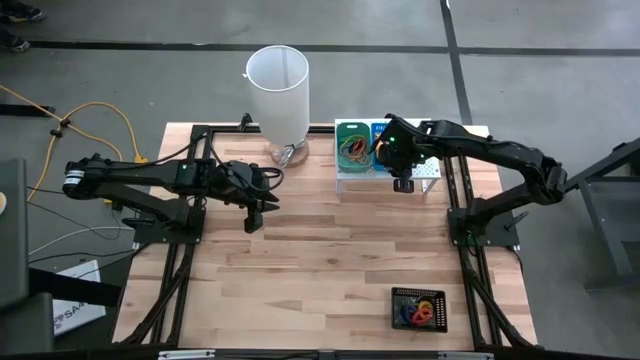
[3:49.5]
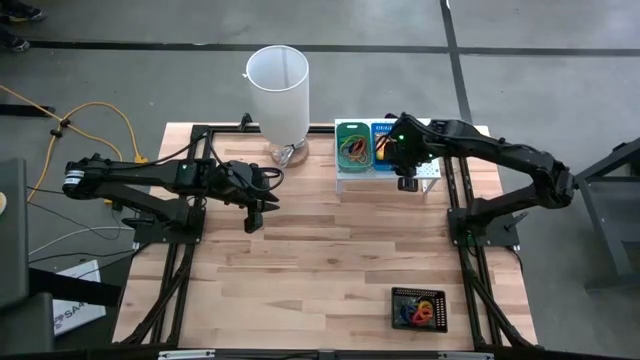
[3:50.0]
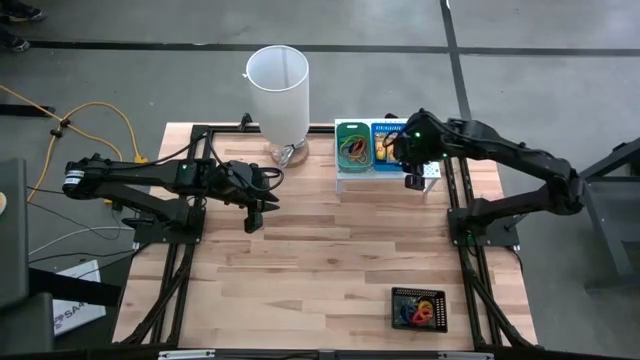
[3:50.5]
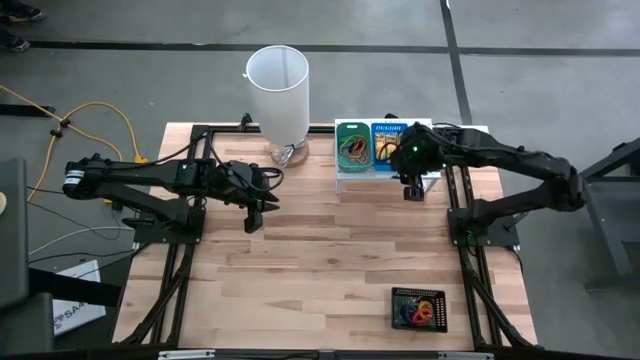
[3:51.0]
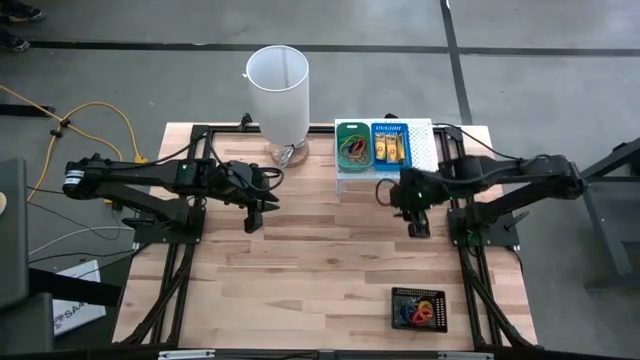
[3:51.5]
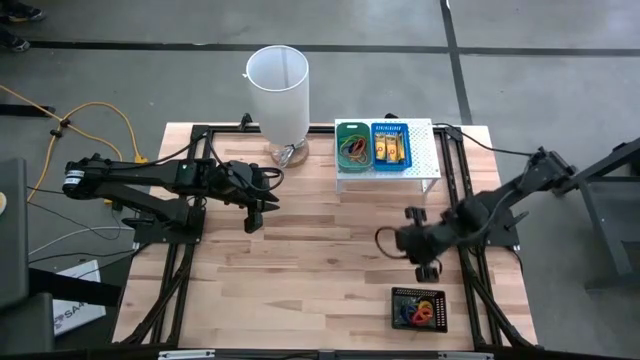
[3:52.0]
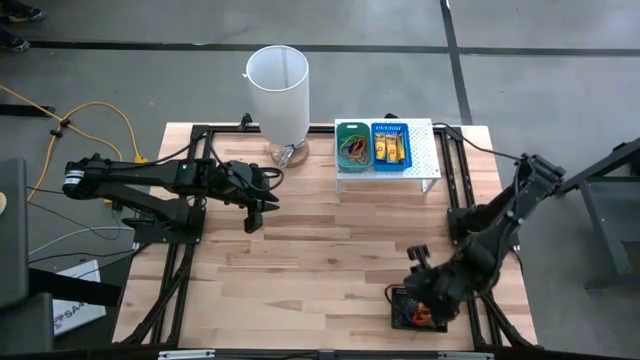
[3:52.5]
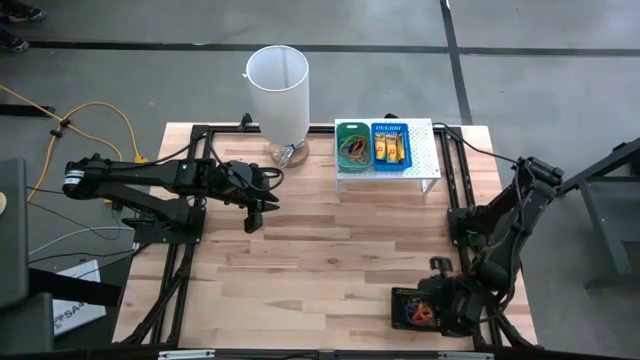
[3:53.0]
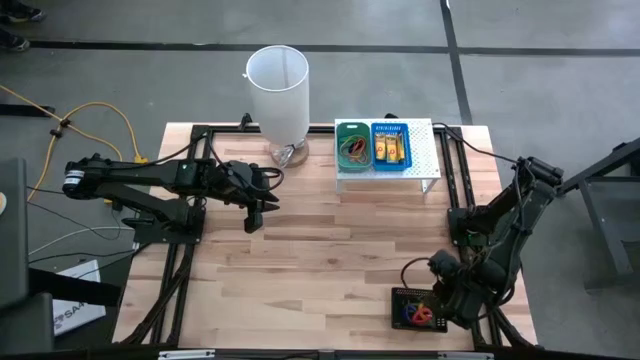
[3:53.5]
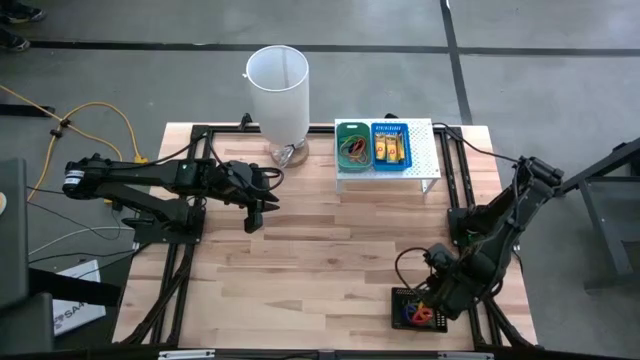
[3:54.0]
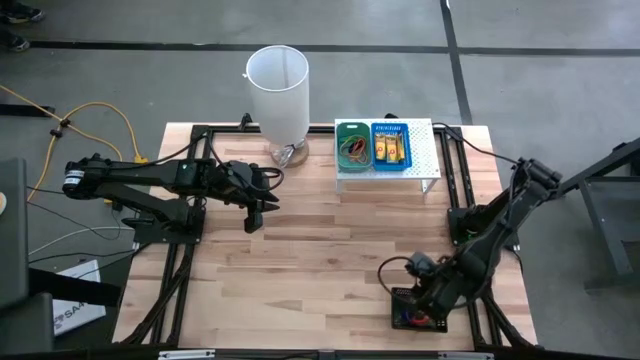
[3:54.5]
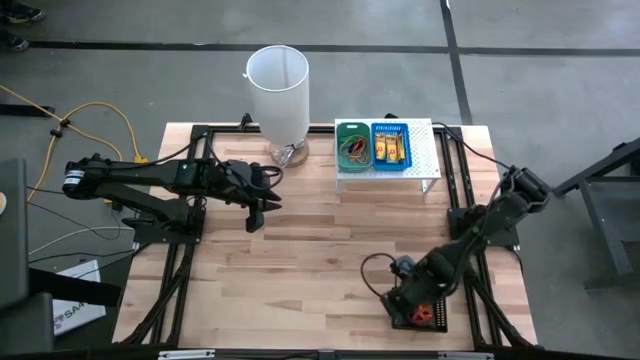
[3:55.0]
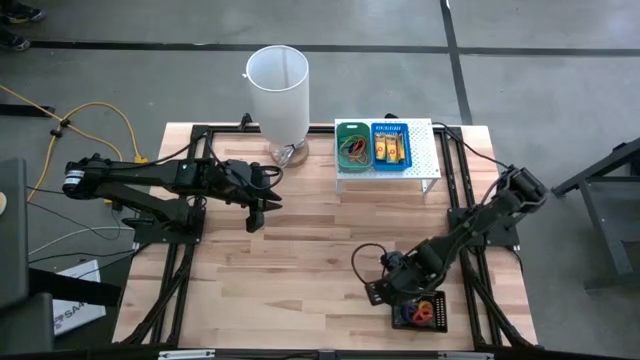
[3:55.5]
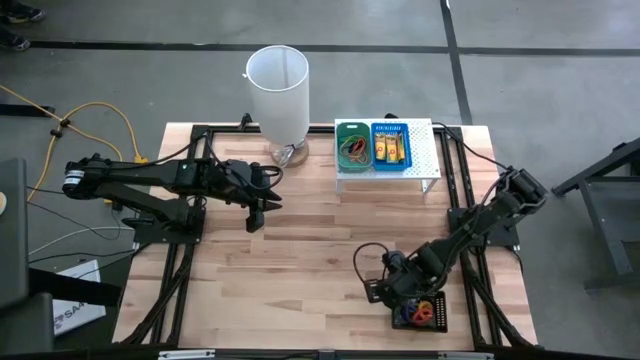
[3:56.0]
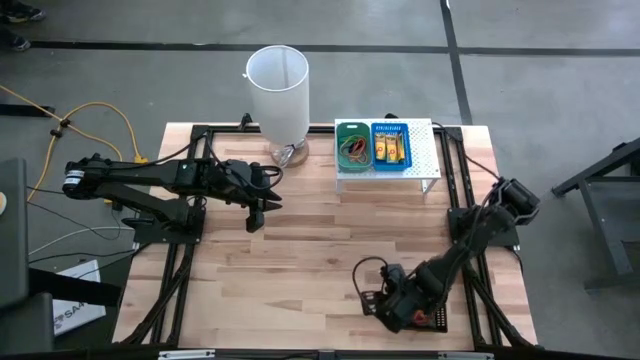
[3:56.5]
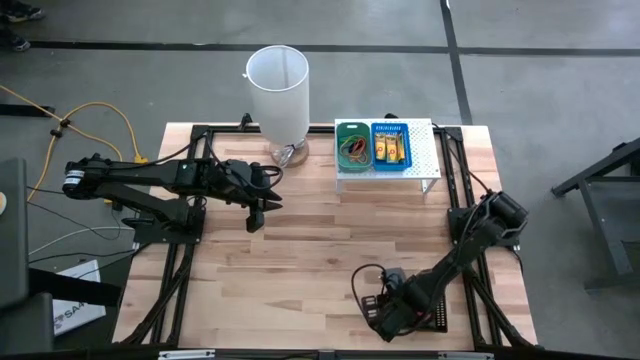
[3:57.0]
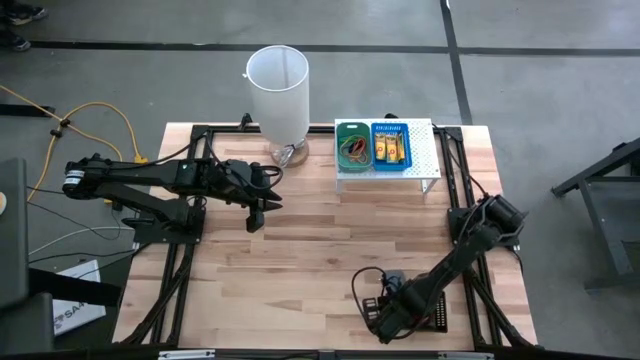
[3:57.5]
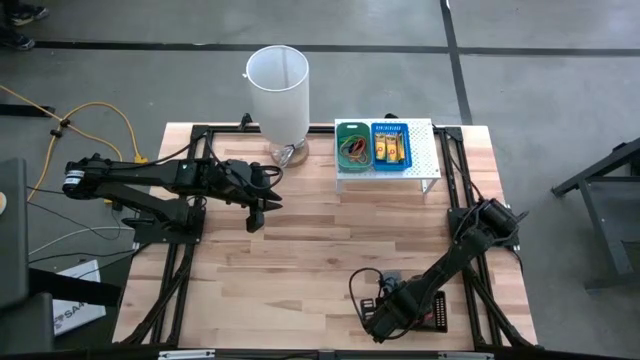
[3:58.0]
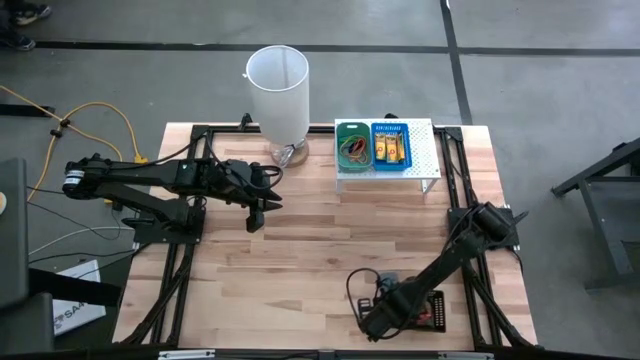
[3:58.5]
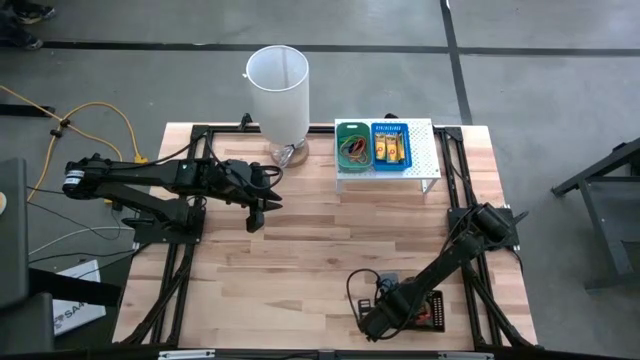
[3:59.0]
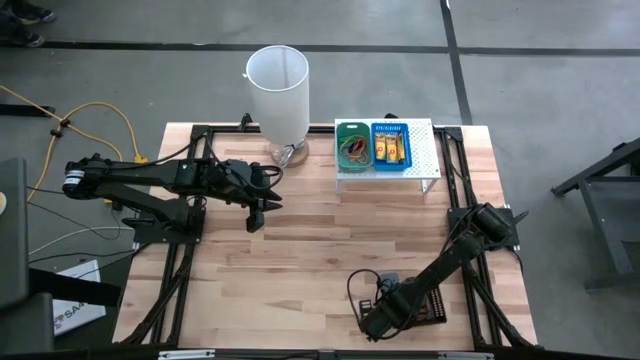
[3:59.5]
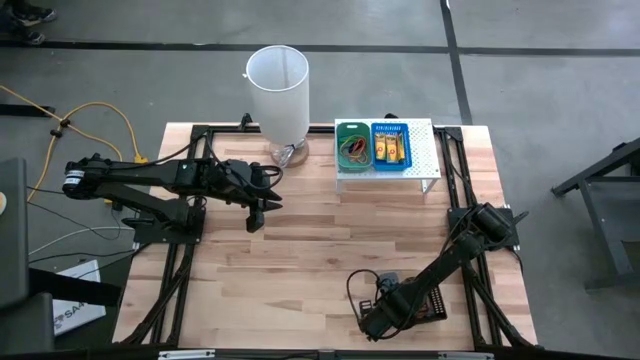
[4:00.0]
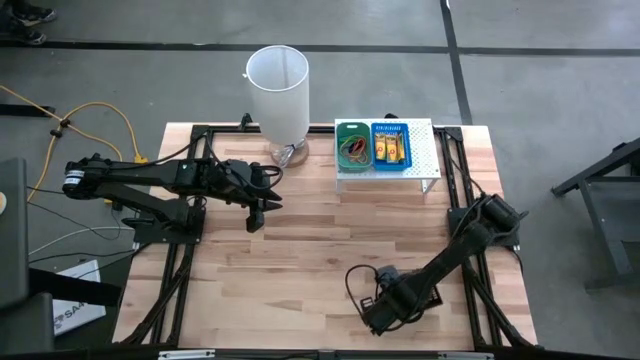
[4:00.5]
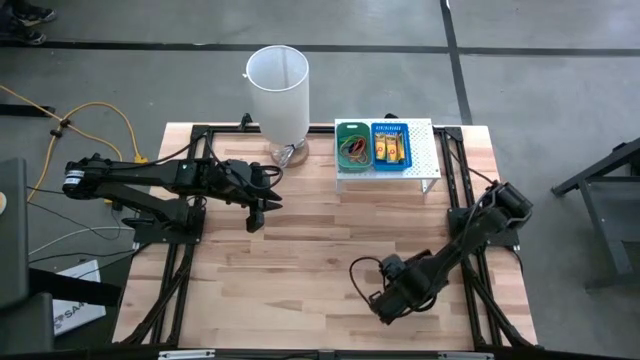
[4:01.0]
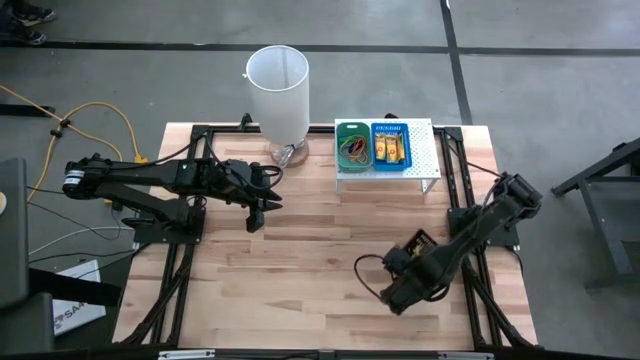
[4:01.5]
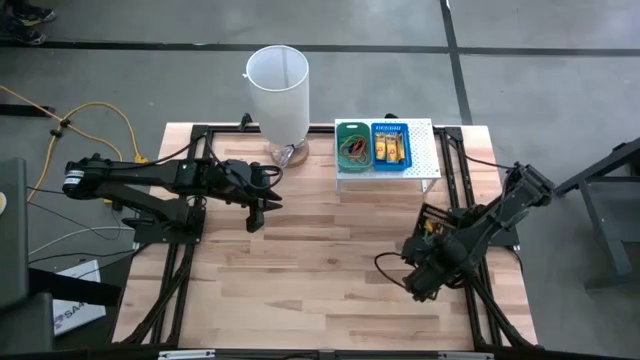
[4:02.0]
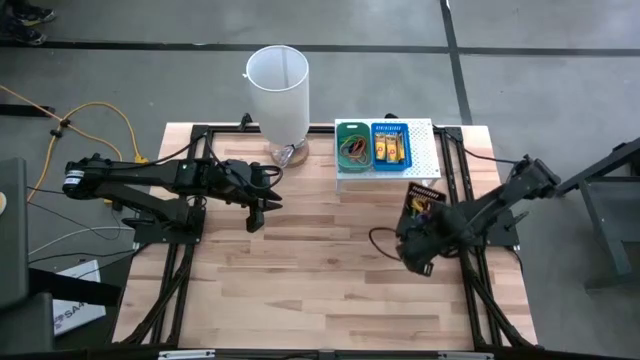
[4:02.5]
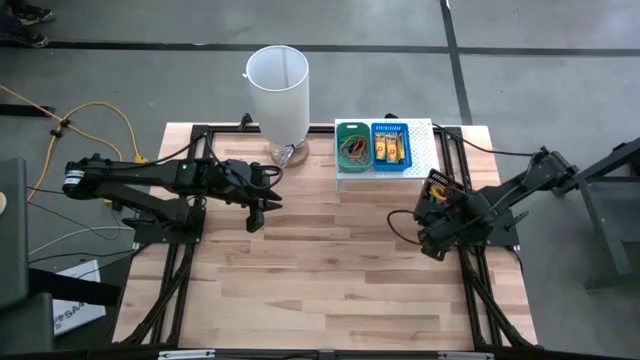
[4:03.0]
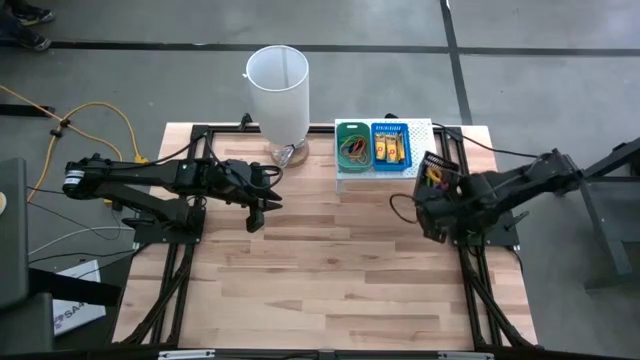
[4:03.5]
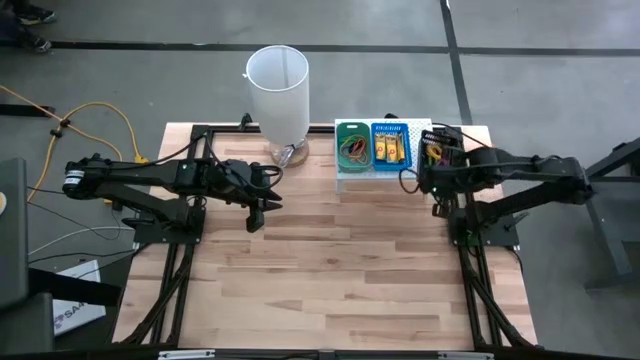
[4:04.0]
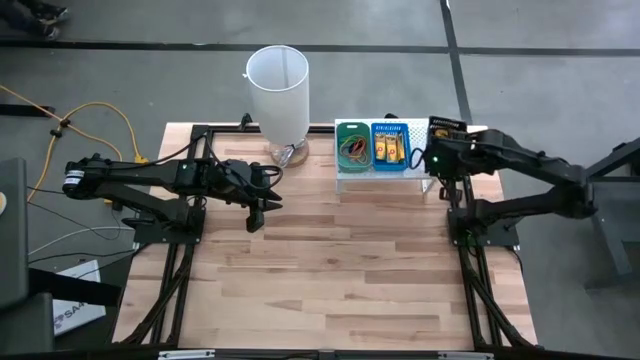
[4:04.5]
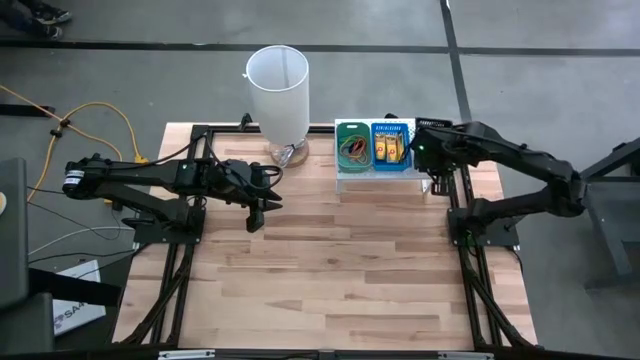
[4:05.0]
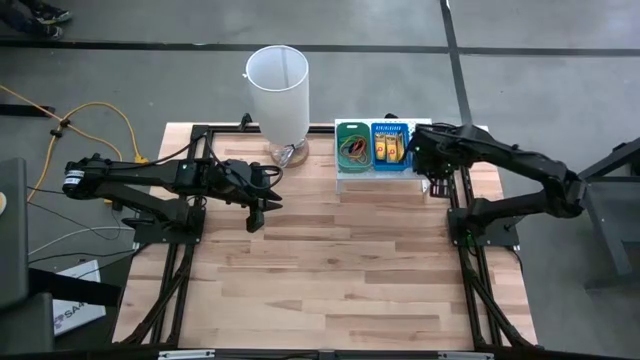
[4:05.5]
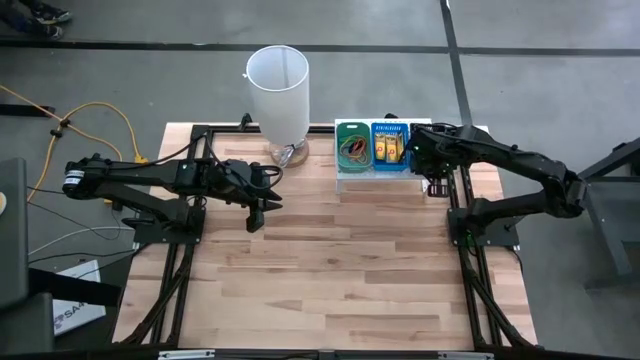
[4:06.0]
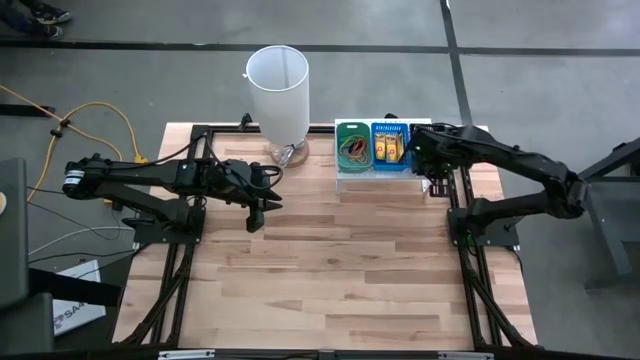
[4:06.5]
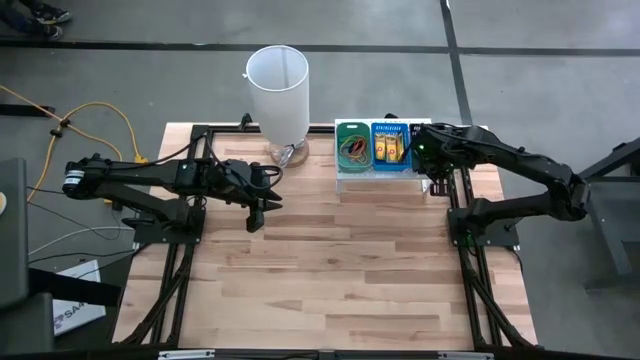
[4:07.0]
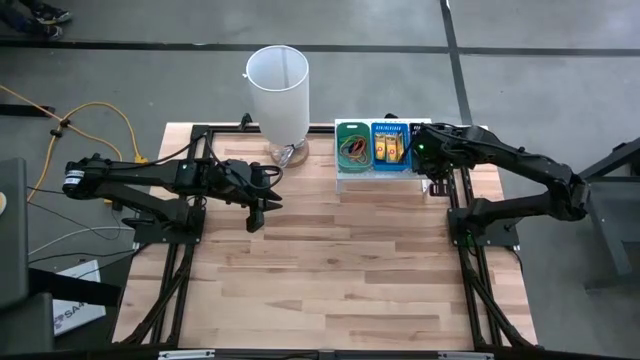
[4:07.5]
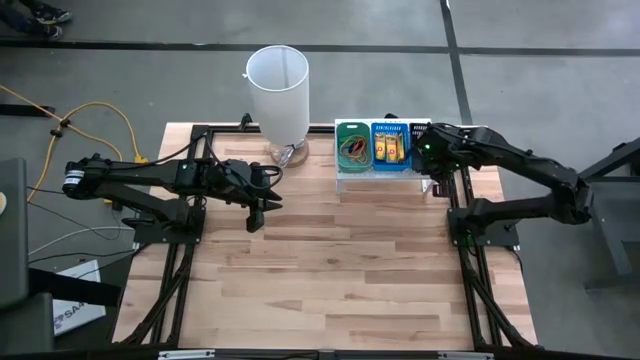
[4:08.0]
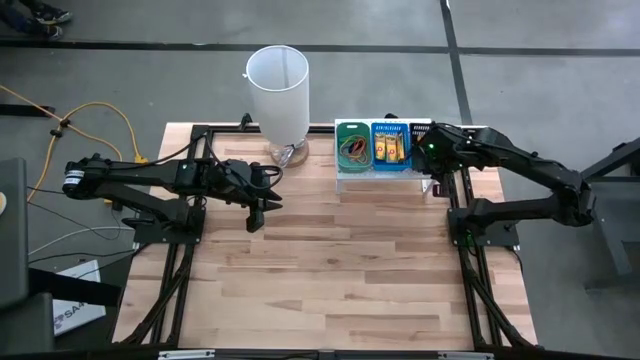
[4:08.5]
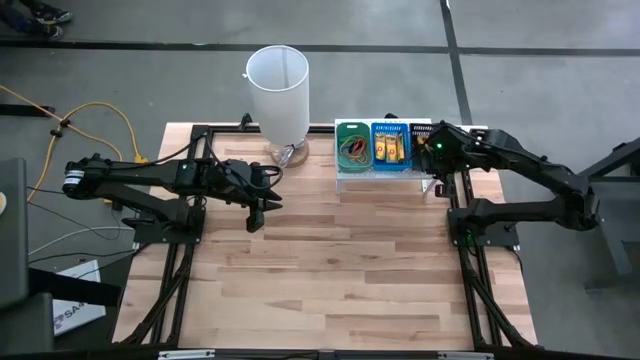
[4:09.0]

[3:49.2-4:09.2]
Task: Pick & Place Office Desk Supplies
Put the black bin on the shelf

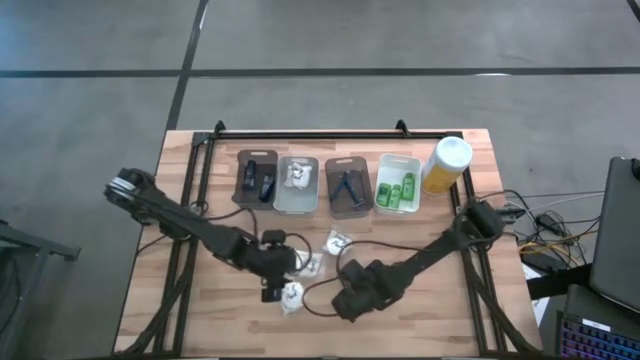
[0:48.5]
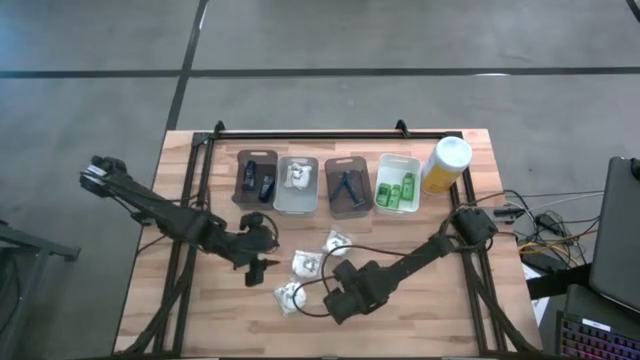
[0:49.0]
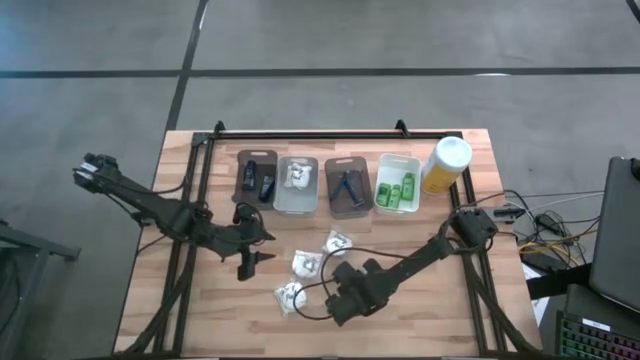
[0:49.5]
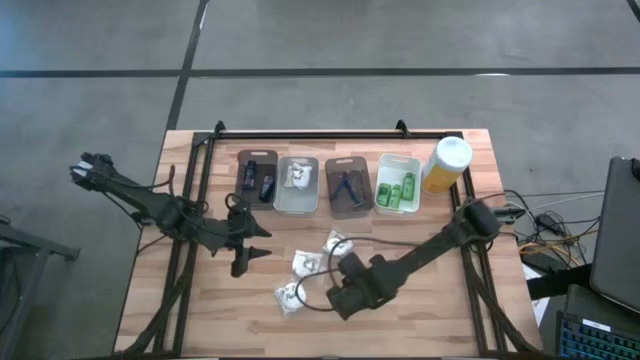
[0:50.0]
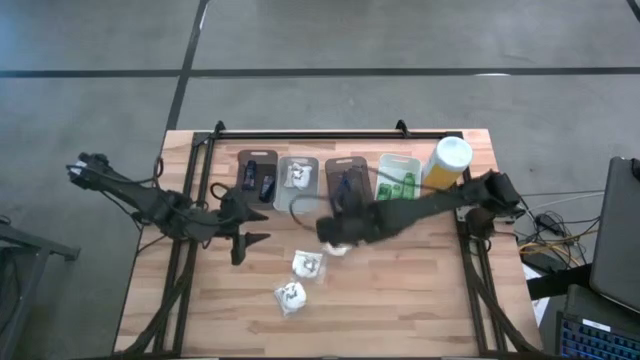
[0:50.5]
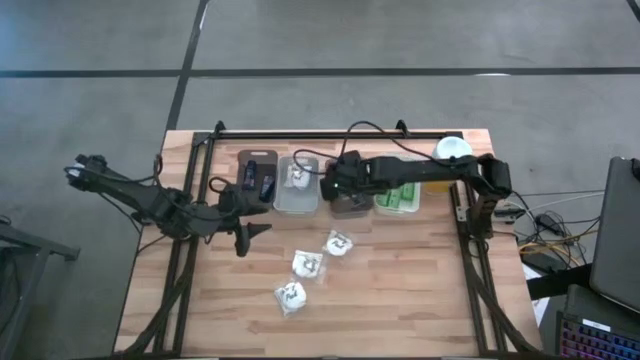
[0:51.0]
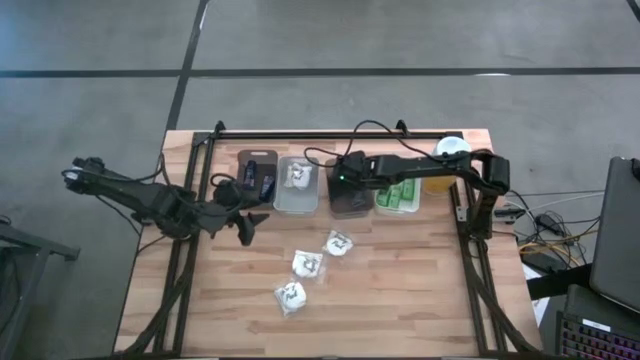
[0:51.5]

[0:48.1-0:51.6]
Task: Pick & Place Travel size toiletries
Put the blue razor into the right black bin
